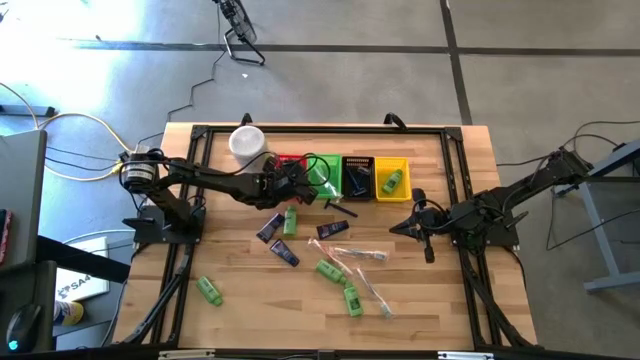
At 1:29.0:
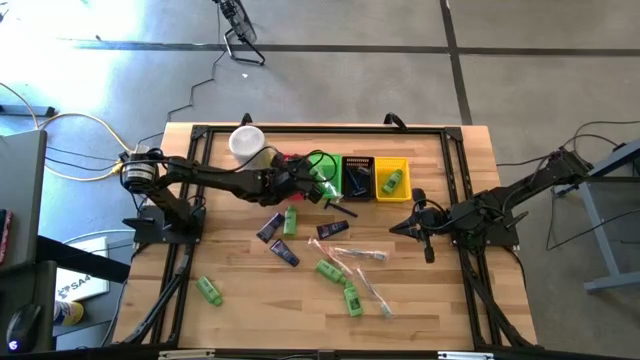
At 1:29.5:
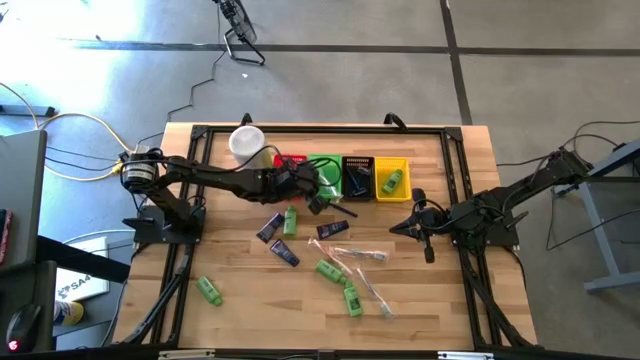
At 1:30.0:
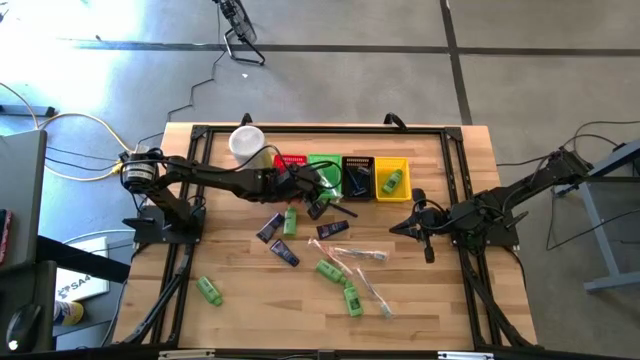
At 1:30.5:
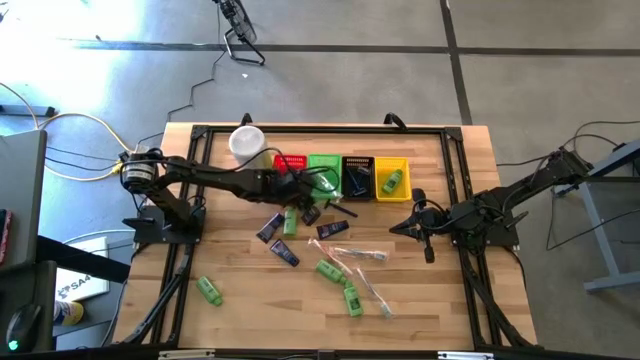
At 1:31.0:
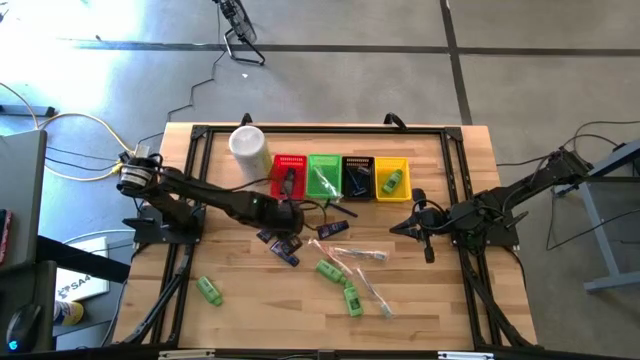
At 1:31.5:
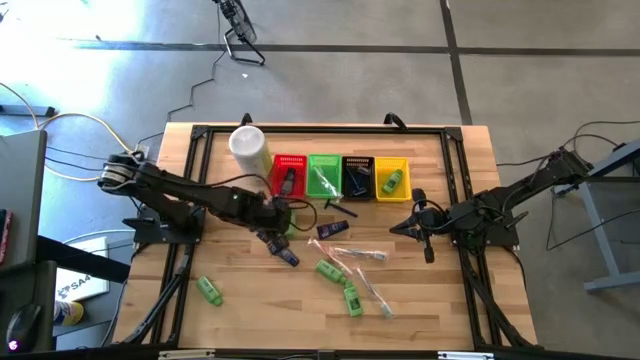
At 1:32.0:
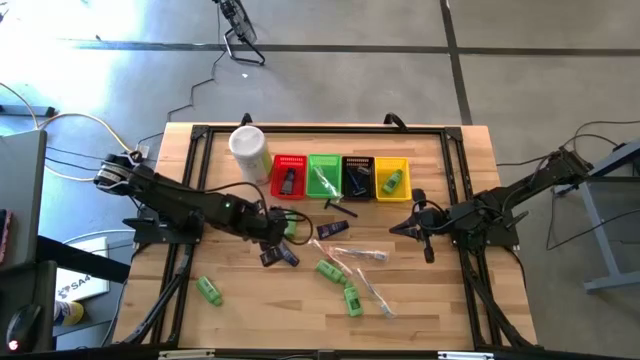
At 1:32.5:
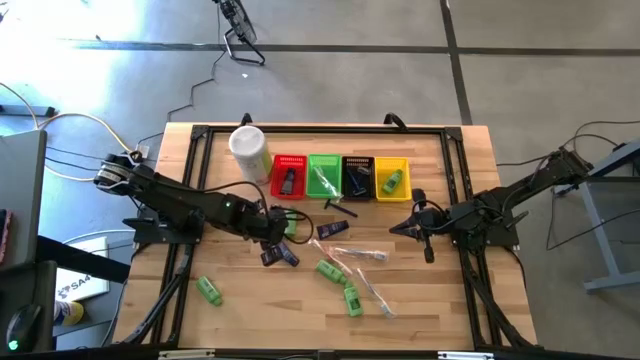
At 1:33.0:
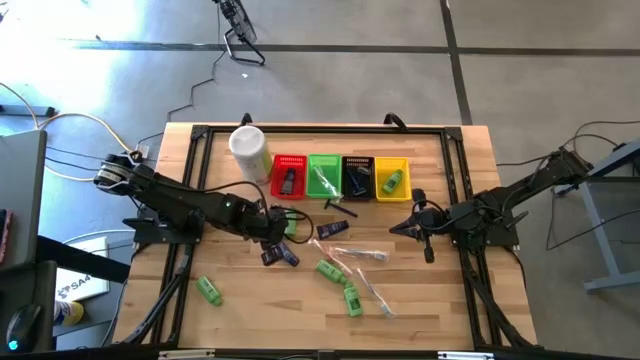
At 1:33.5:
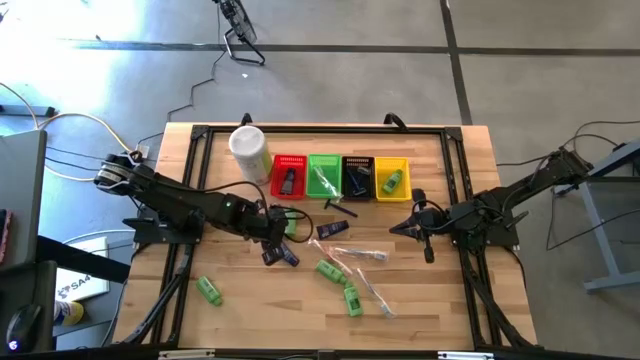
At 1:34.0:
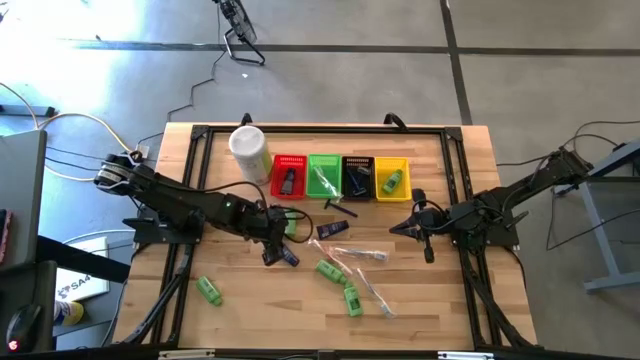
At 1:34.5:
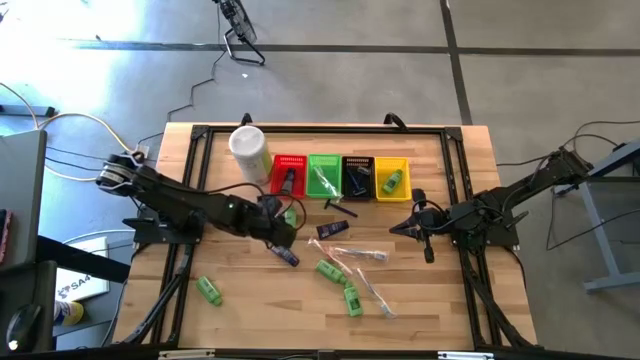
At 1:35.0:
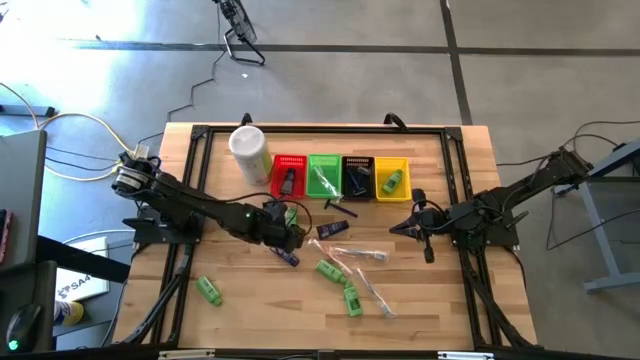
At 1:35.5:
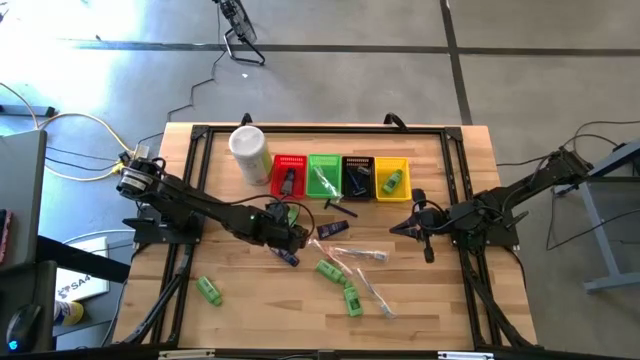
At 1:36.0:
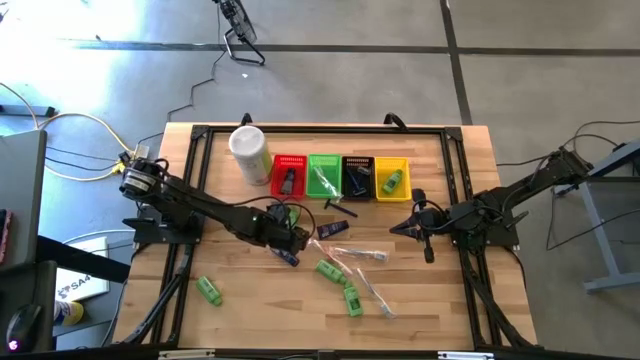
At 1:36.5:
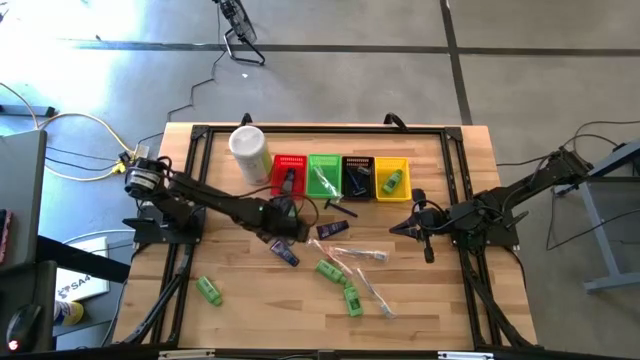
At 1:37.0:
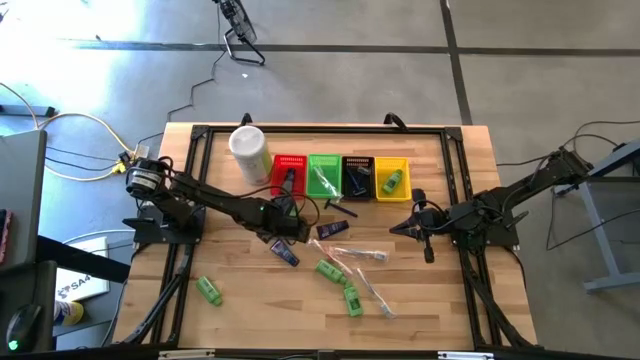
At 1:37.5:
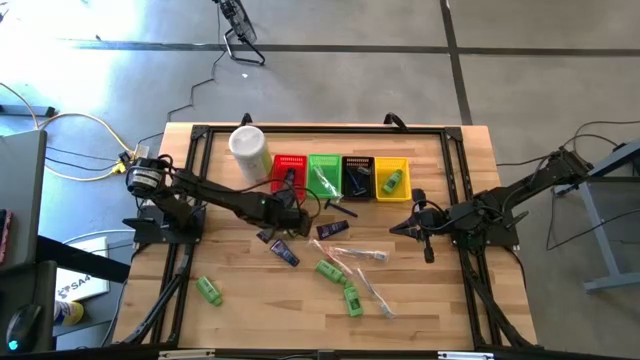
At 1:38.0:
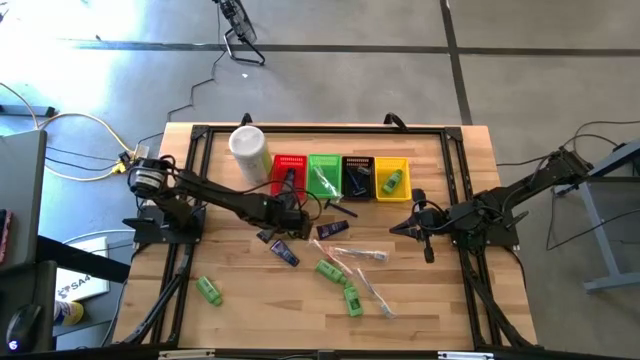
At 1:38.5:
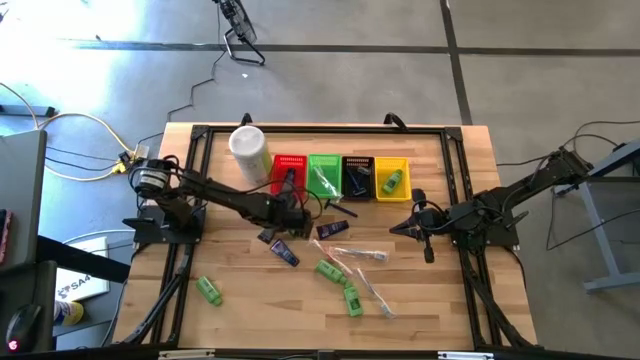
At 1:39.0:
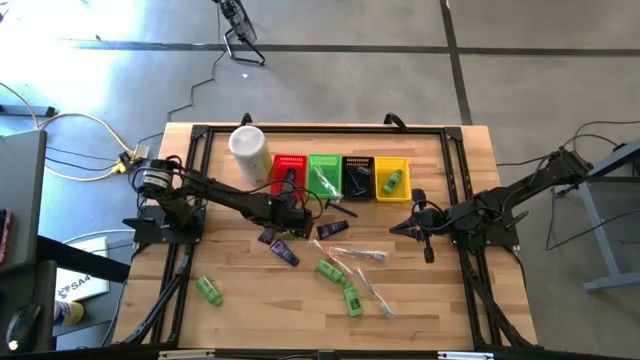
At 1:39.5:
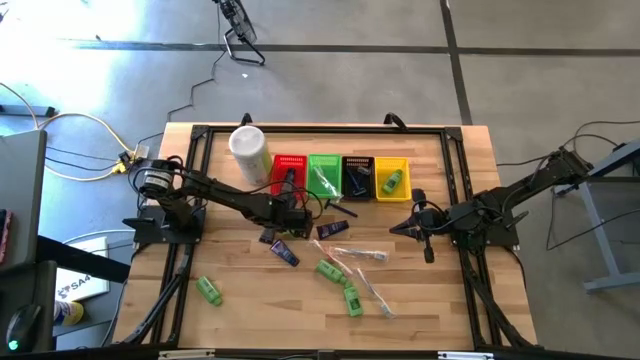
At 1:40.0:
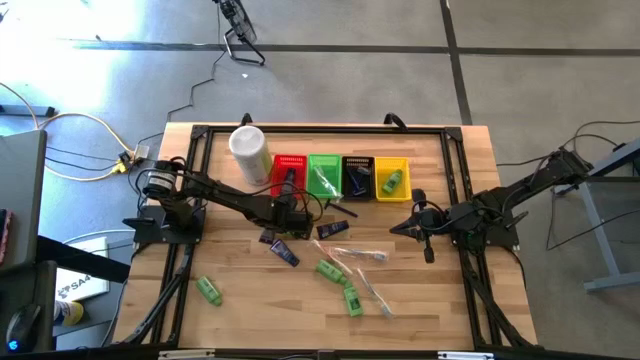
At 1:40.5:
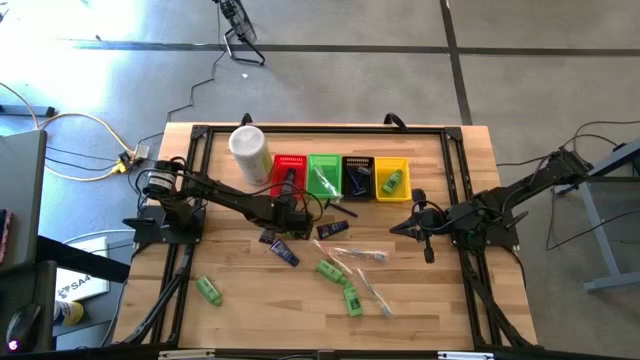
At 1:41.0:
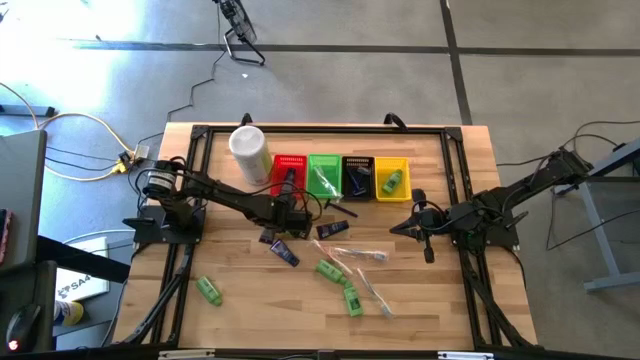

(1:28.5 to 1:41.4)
Task: Pick & Place Travel size toiletries
Put the green shampoo into the yellow bin

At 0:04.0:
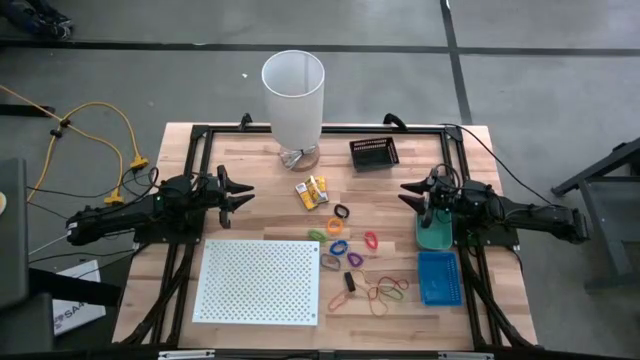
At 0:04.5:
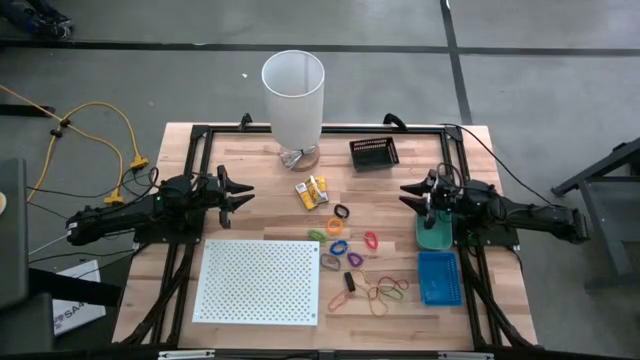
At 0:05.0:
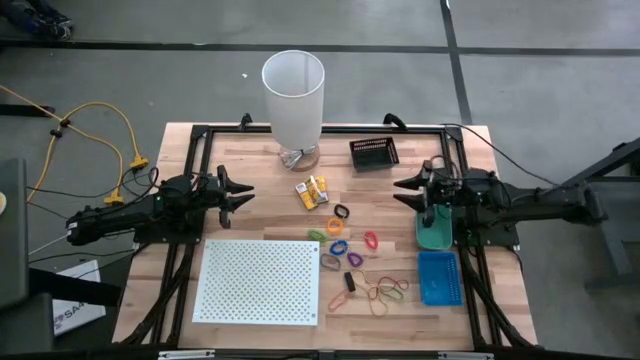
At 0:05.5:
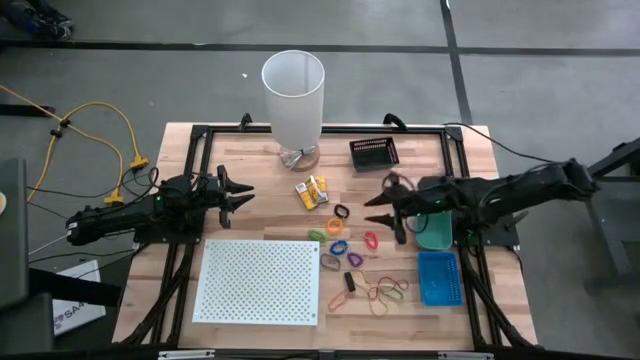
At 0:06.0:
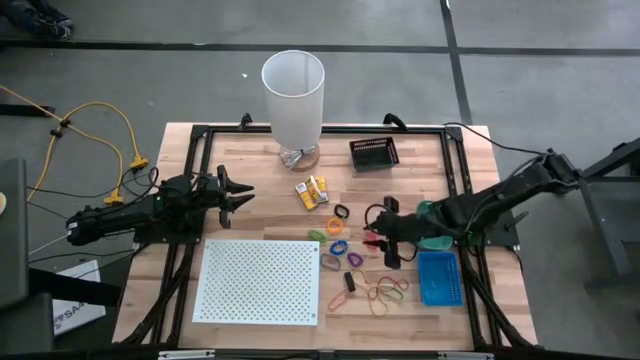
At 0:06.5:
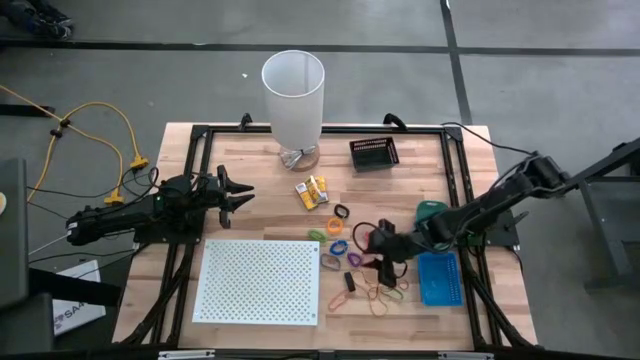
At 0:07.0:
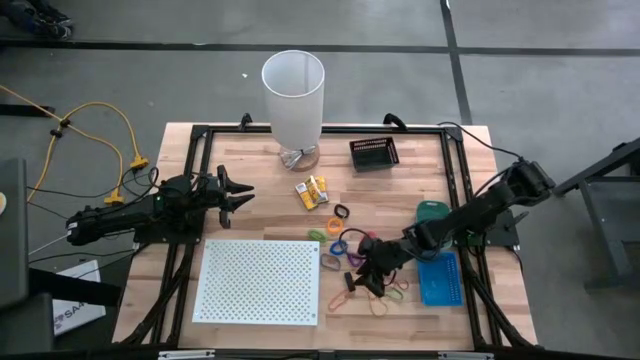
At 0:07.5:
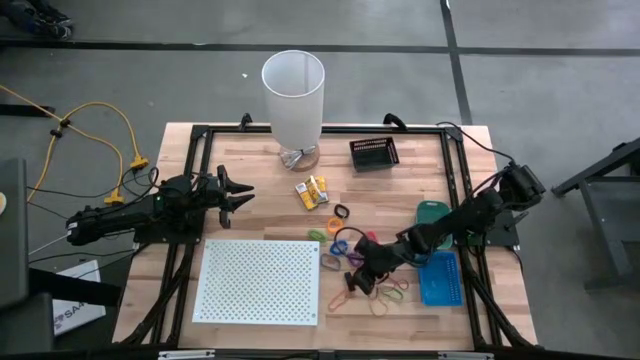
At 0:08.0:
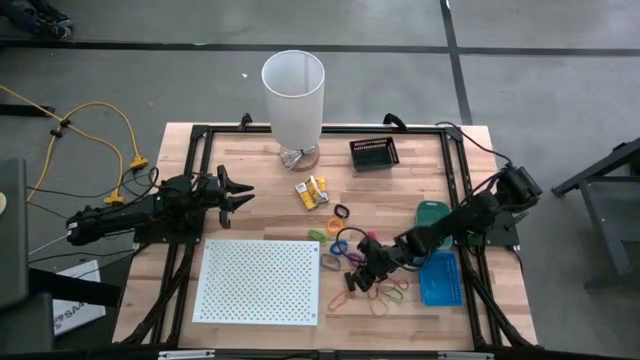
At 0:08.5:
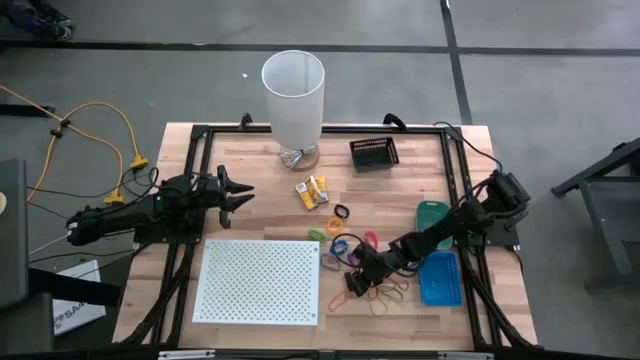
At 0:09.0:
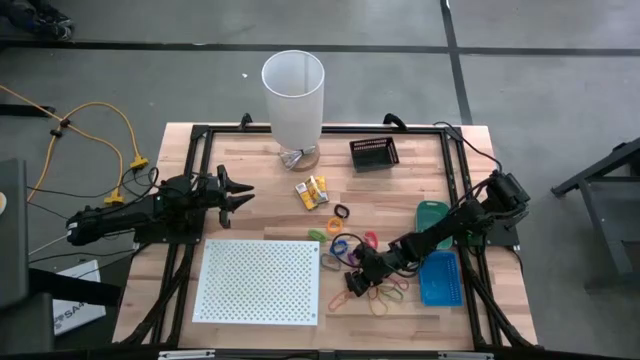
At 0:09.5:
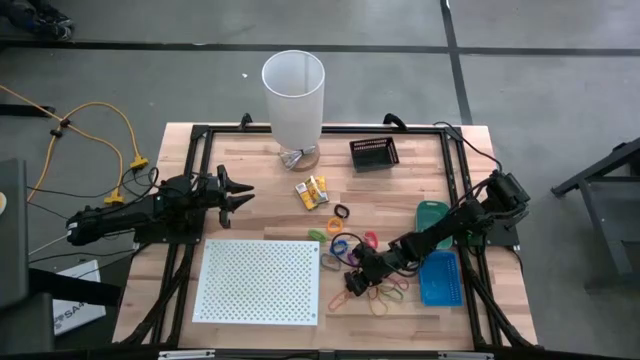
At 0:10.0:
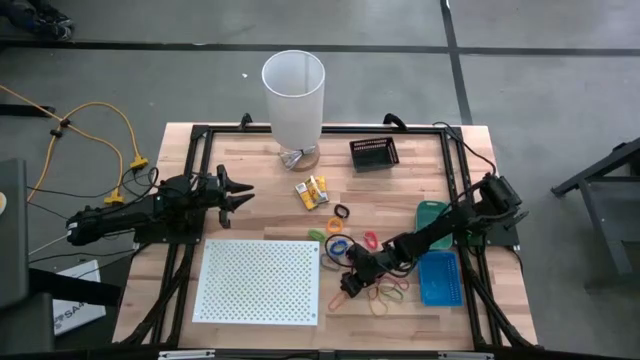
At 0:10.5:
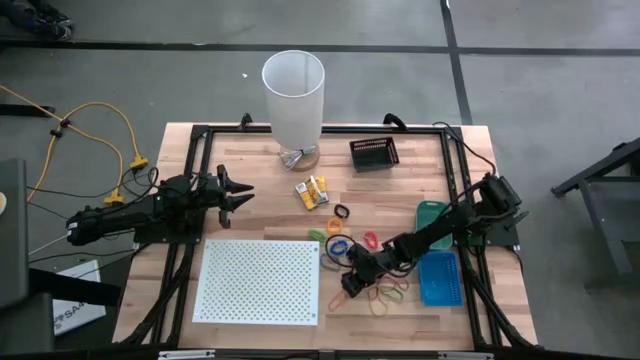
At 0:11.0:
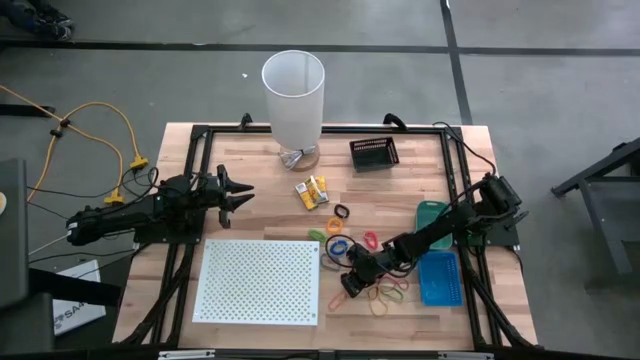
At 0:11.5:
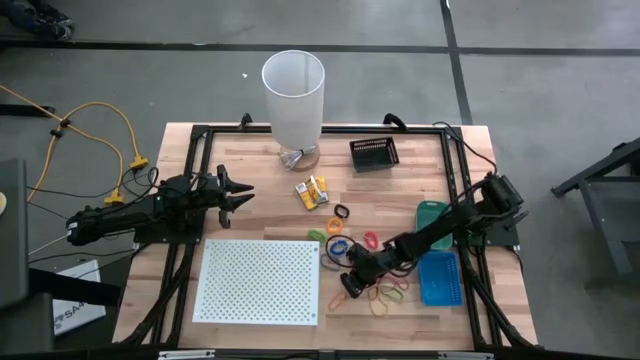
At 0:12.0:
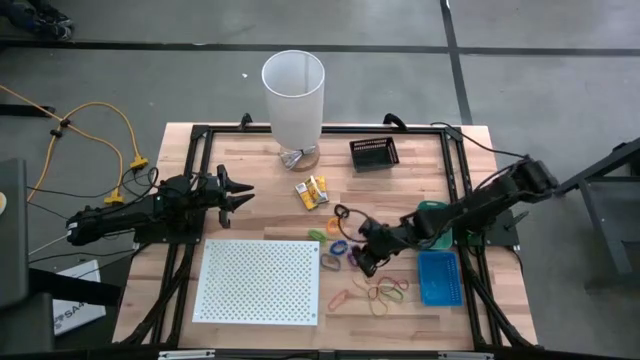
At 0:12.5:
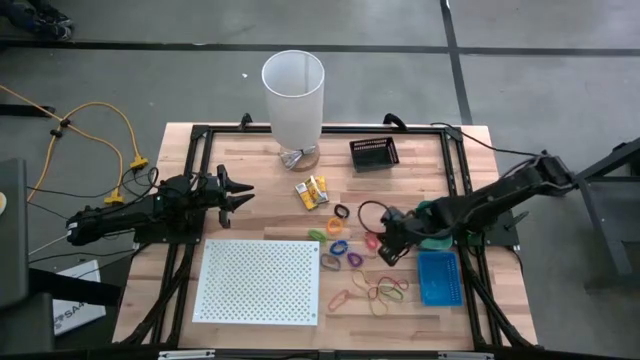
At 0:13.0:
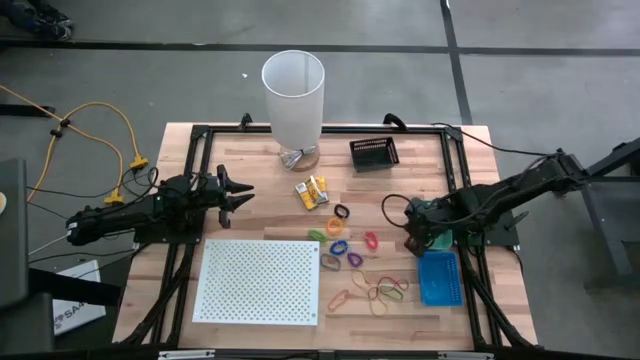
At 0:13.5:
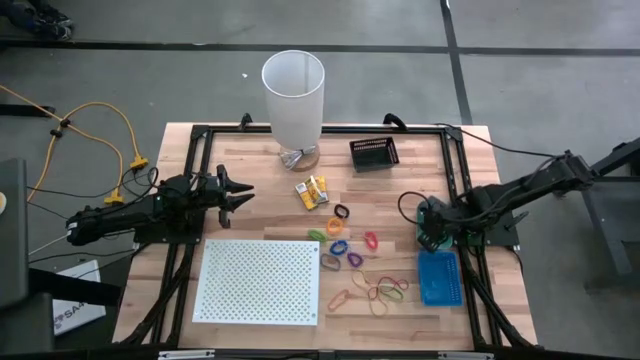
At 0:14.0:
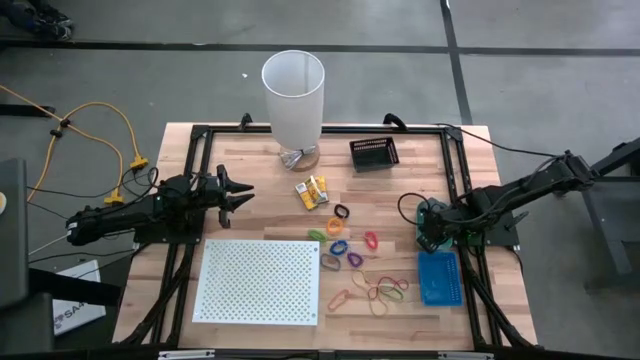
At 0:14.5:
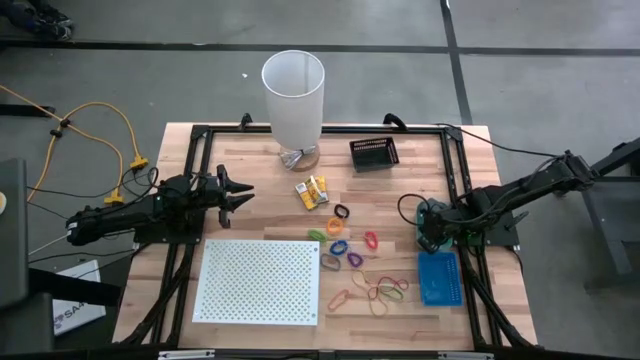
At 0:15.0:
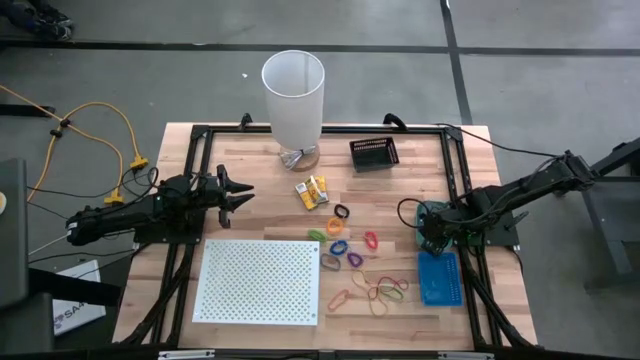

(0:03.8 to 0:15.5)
Task: Pick & Place Office Desk Supplies
Put the black rubber band into the green bin
